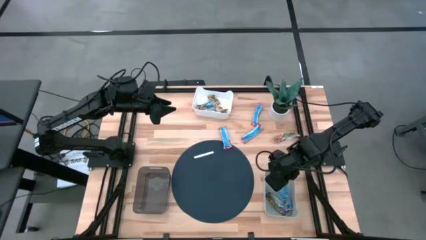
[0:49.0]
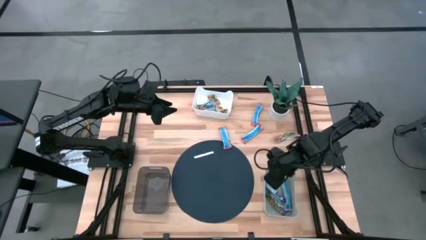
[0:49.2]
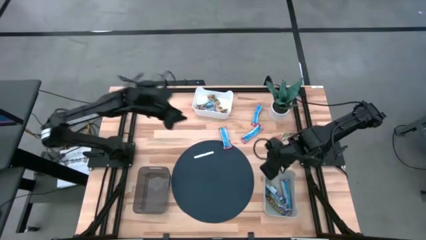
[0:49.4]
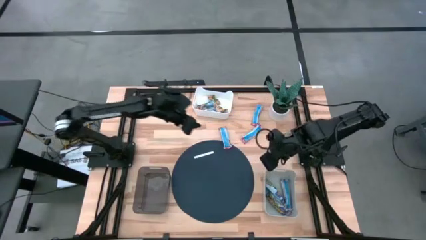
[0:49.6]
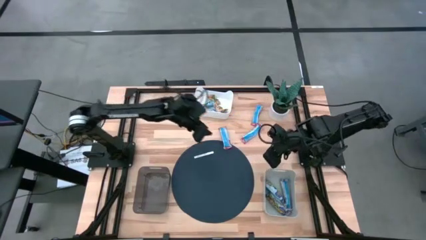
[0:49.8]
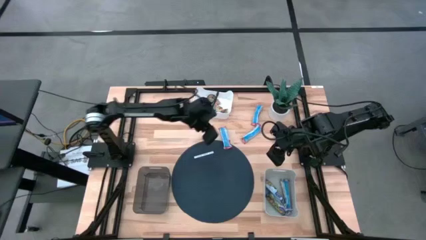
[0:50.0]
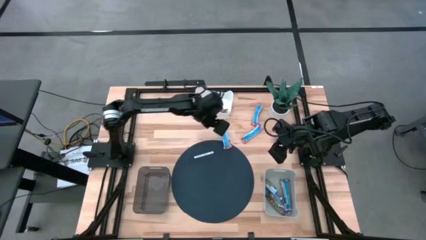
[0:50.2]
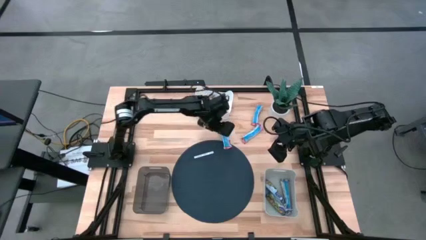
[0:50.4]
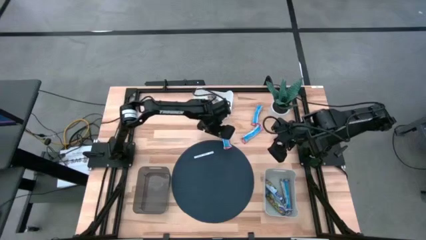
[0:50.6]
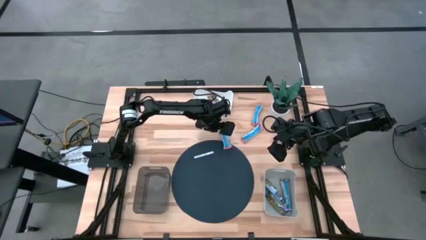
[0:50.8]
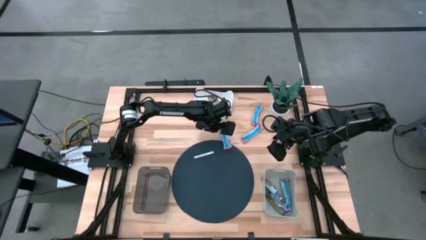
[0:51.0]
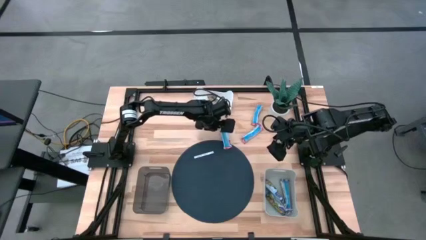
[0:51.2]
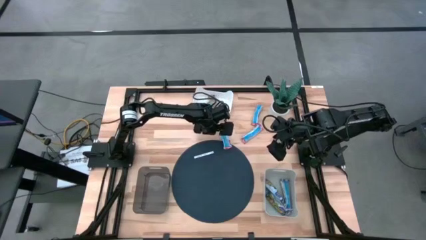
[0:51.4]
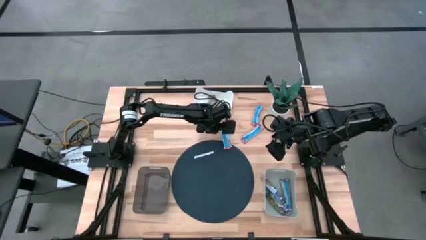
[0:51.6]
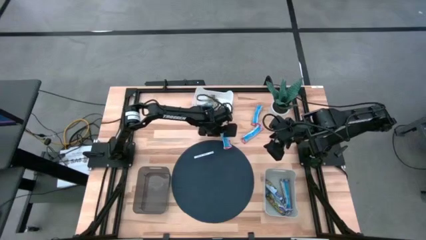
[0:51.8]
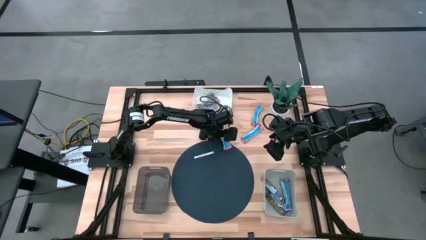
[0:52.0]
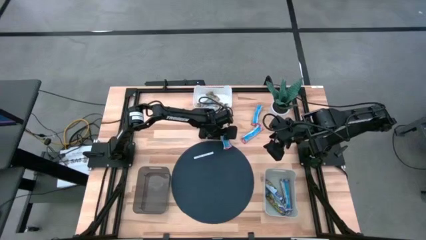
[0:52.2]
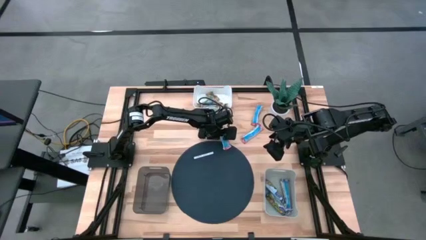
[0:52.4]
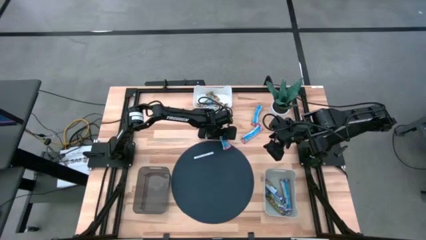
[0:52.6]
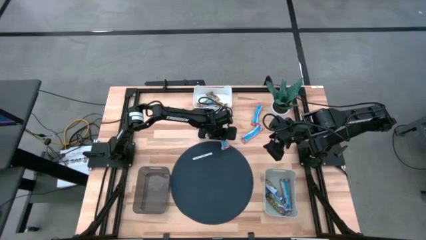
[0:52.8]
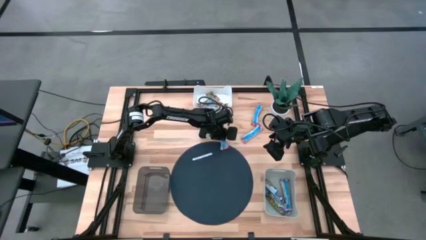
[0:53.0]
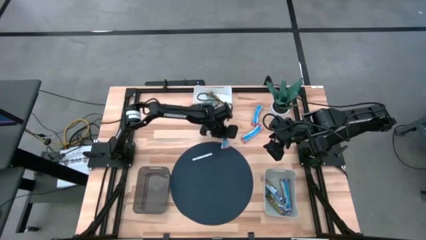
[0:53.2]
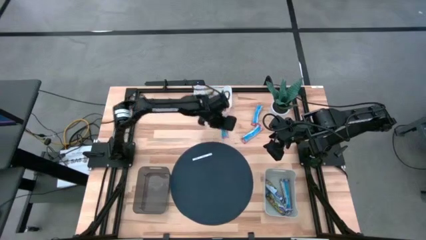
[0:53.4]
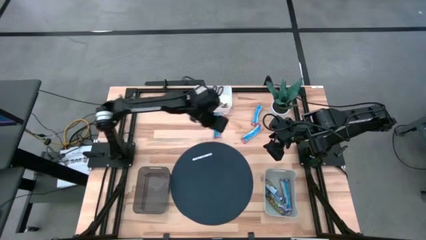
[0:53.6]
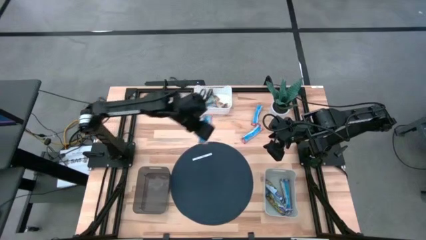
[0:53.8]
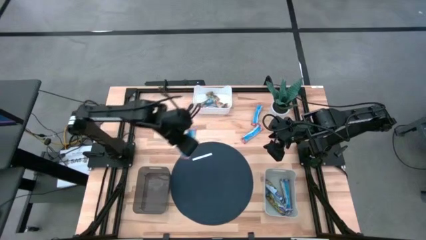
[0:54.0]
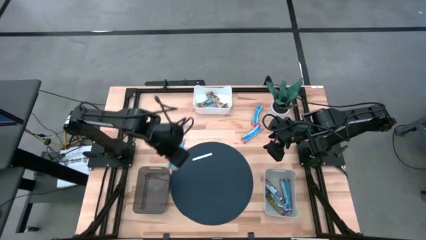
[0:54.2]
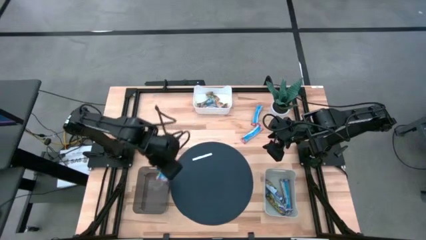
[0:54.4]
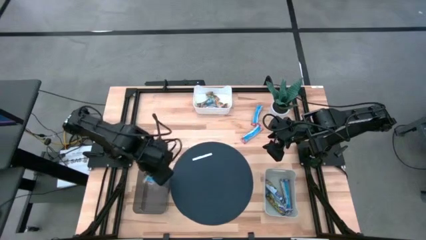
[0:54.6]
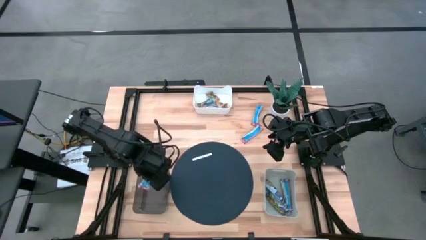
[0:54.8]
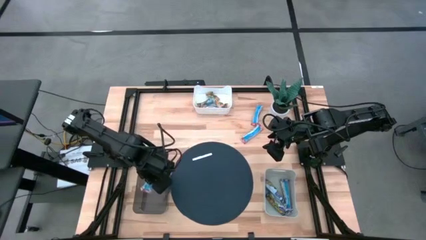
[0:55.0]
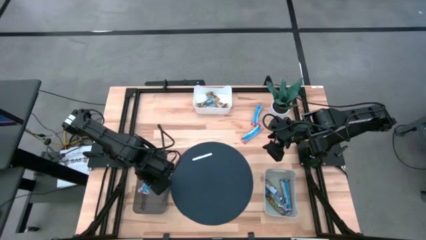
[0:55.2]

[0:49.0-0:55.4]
Task: Pick and place Granola Bars by type
Put the red granola bar into the black bin

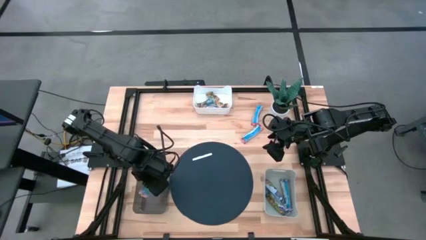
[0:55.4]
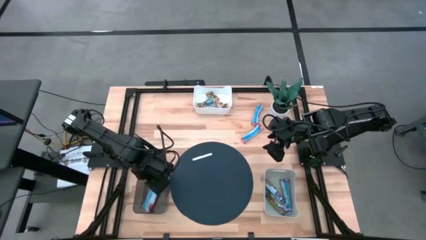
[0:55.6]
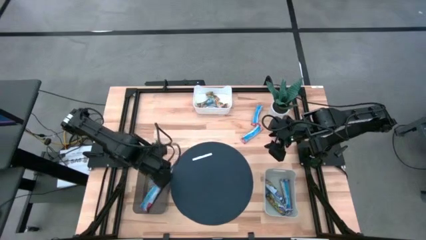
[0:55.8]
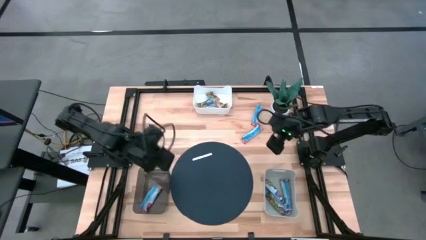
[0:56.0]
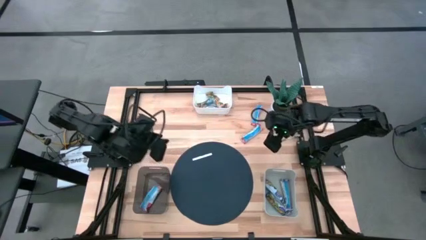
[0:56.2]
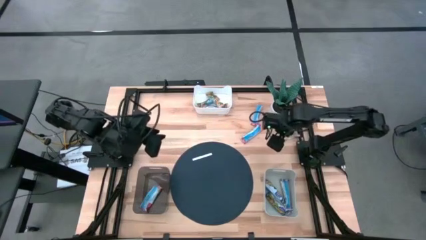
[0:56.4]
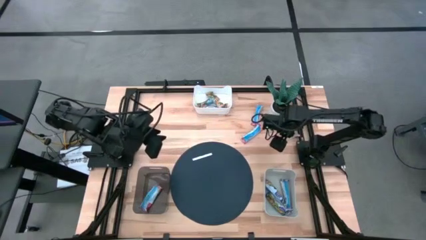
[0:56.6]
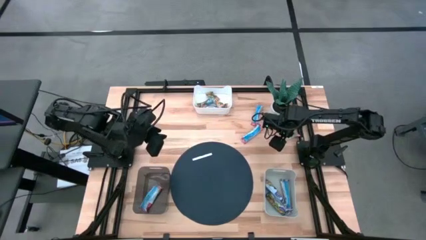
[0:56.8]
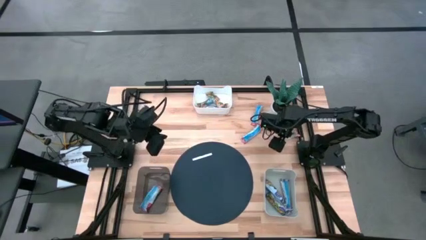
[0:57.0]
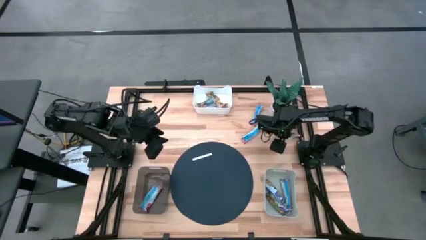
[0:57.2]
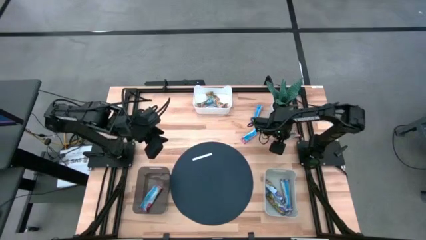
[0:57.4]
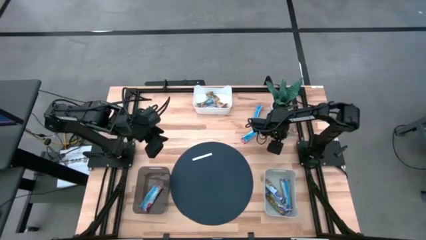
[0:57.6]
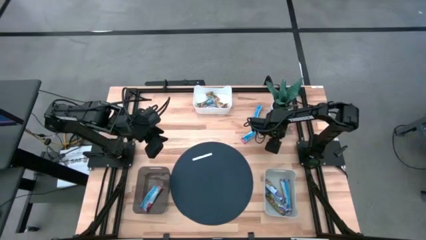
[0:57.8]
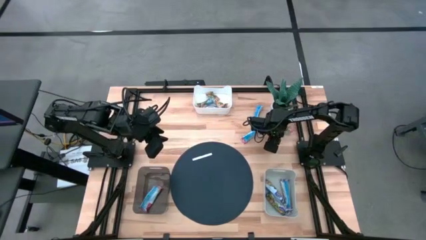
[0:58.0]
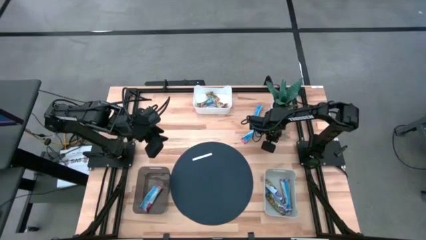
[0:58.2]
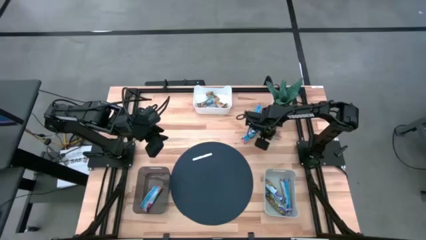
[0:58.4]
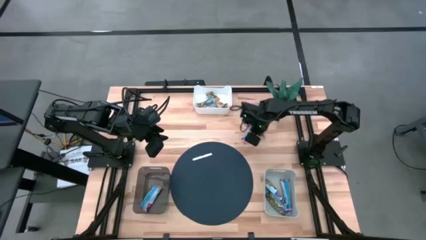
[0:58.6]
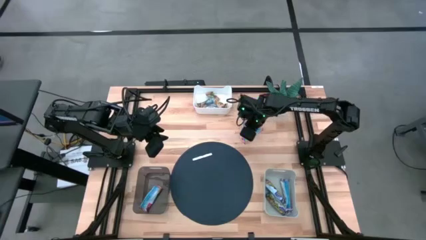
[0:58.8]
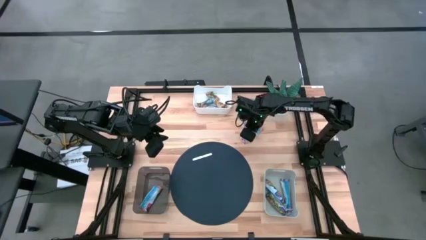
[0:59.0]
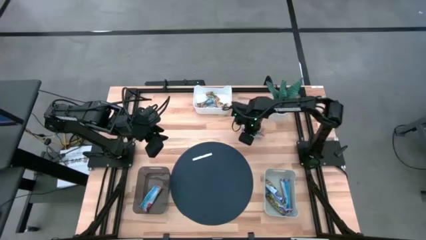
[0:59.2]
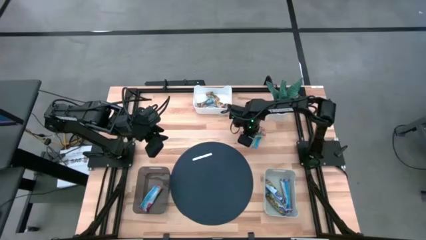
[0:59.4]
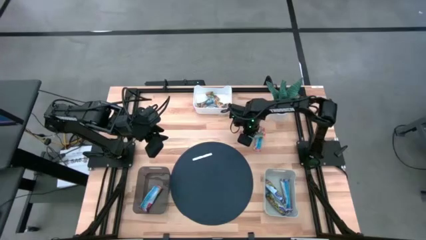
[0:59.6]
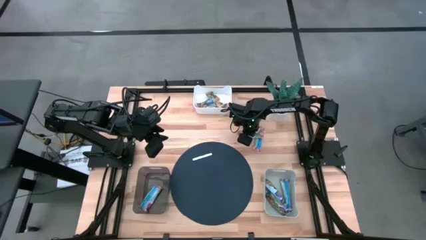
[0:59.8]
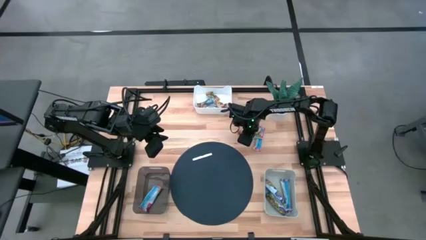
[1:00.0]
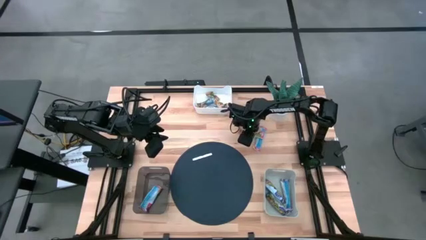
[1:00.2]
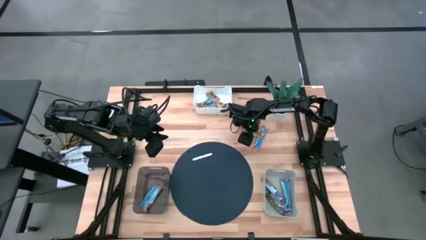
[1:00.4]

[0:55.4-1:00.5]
Put the red granola bar into the black bin

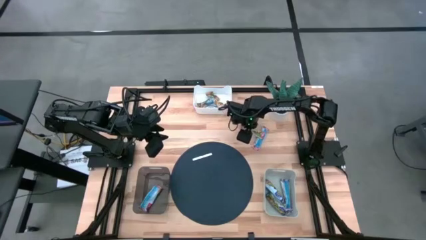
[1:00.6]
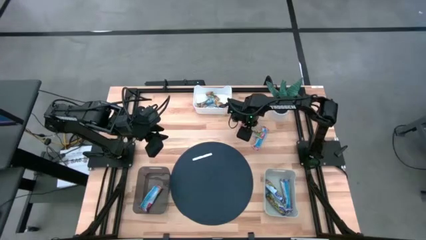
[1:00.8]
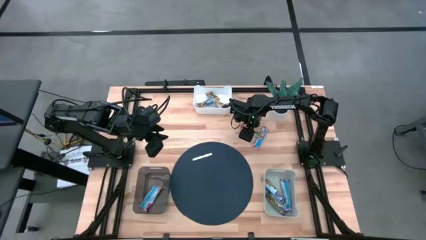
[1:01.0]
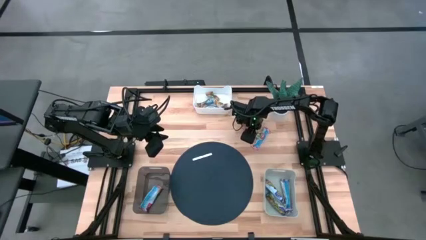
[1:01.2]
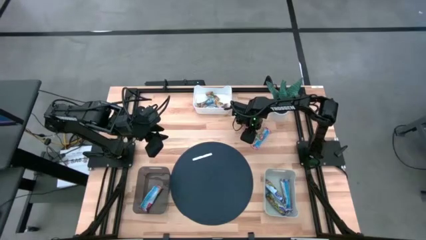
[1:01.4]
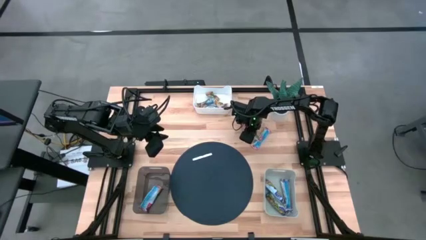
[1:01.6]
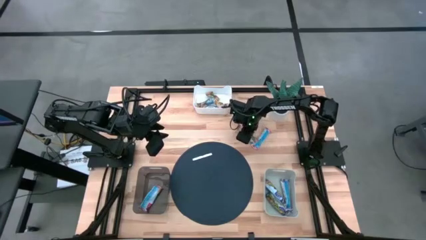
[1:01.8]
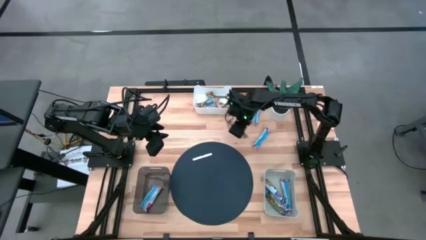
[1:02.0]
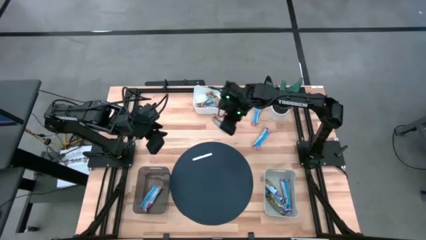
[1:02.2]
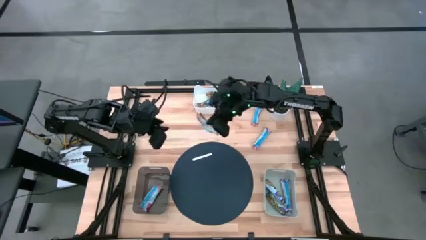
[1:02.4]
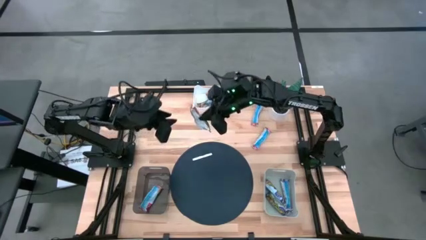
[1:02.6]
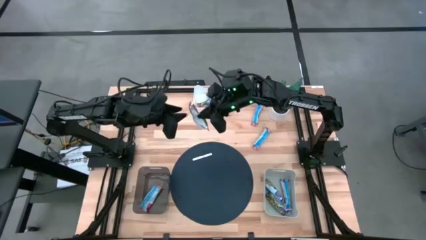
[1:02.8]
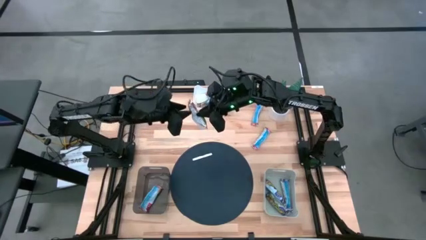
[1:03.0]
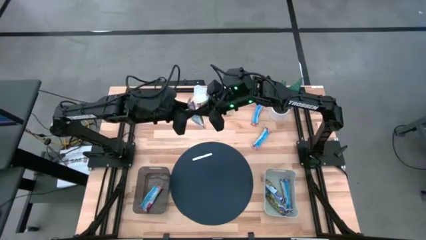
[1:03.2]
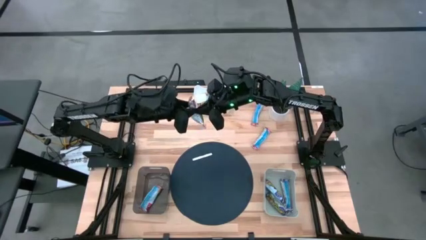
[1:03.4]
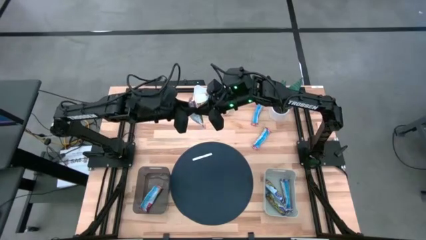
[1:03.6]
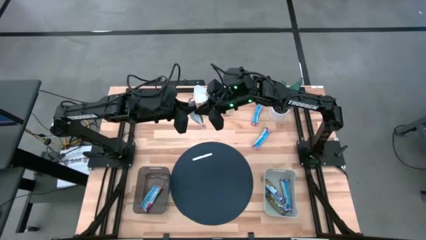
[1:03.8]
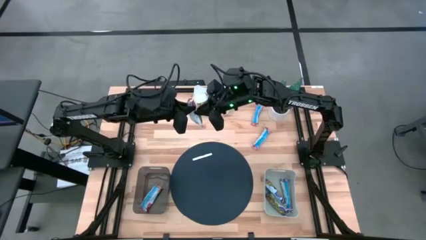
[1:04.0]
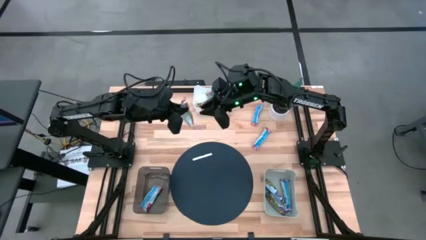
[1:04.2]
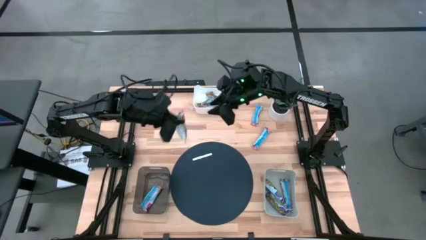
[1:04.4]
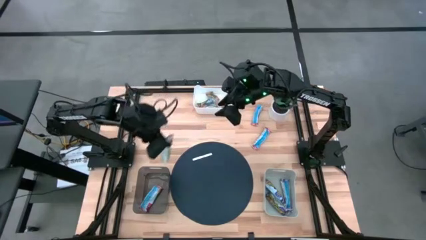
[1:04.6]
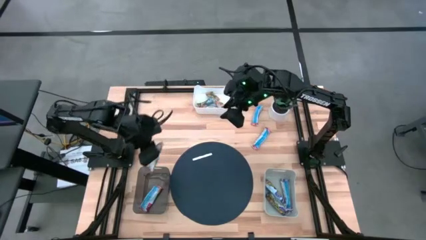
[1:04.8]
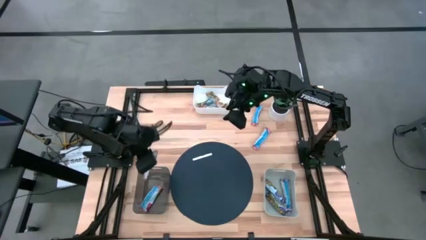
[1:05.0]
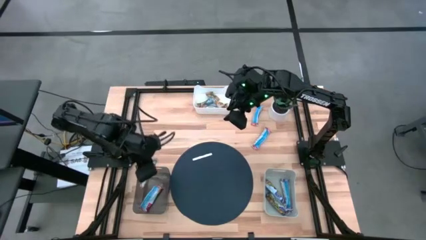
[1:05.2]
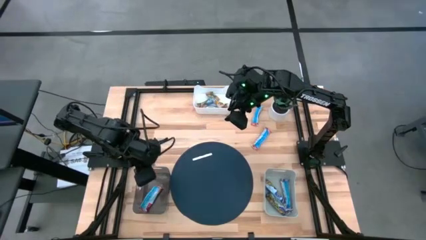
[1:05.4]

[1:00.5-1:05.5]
Put the red granola bar into the black bin
